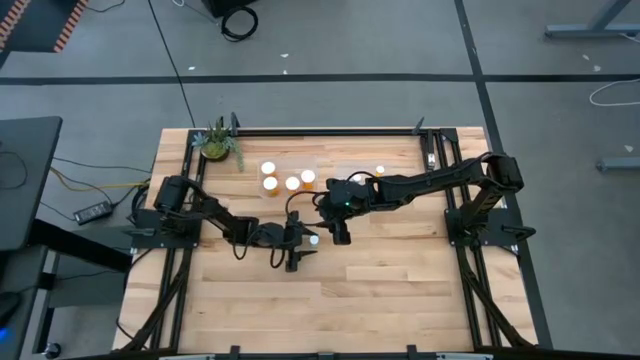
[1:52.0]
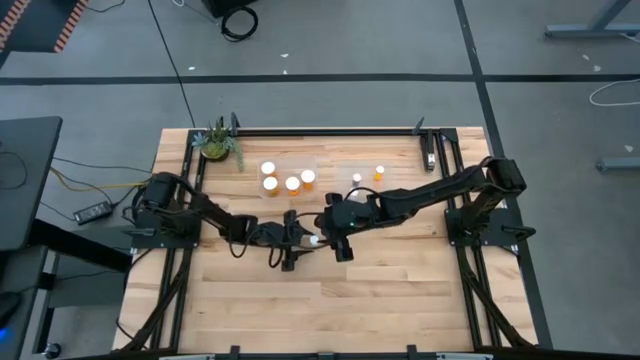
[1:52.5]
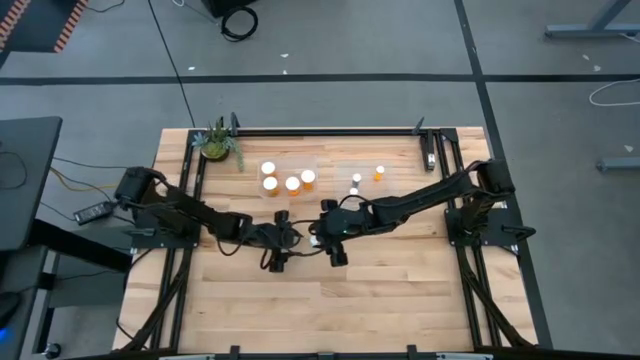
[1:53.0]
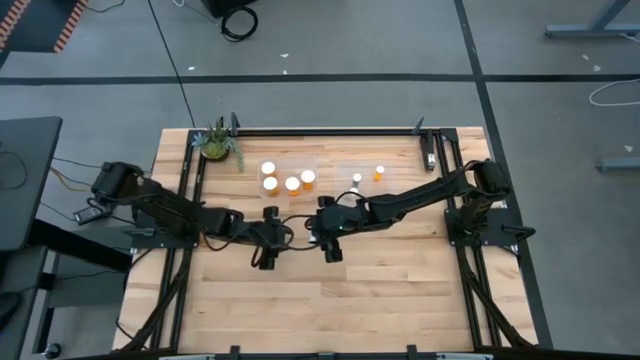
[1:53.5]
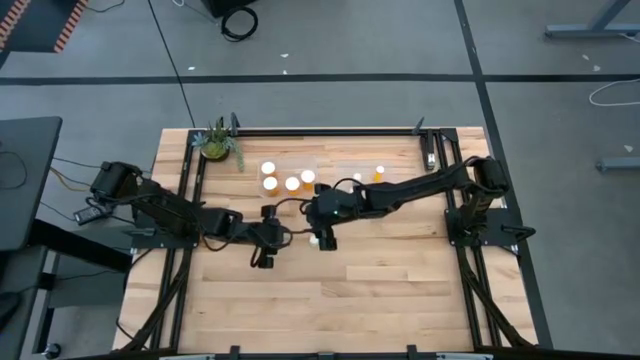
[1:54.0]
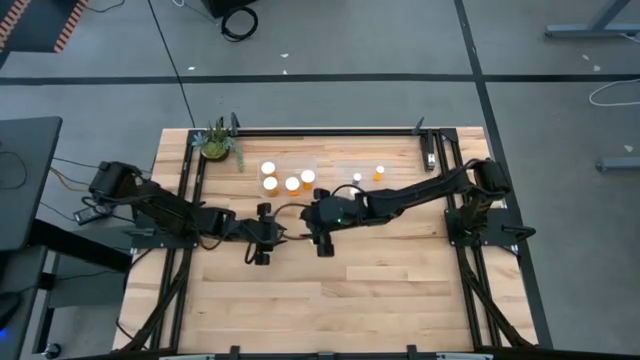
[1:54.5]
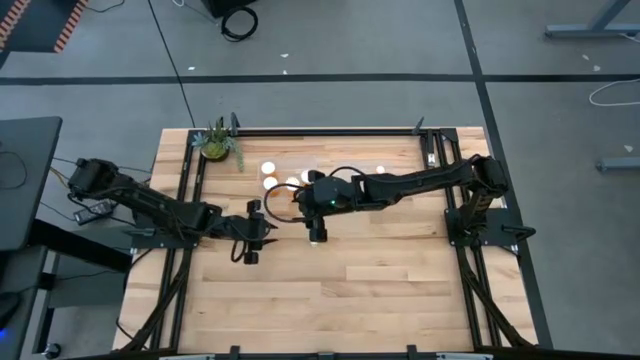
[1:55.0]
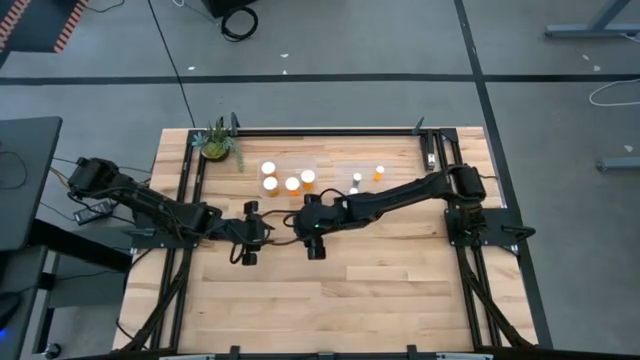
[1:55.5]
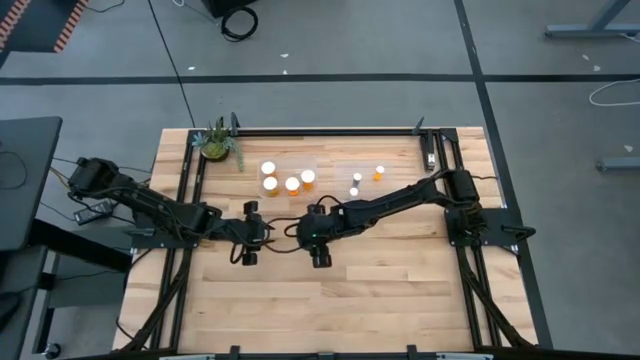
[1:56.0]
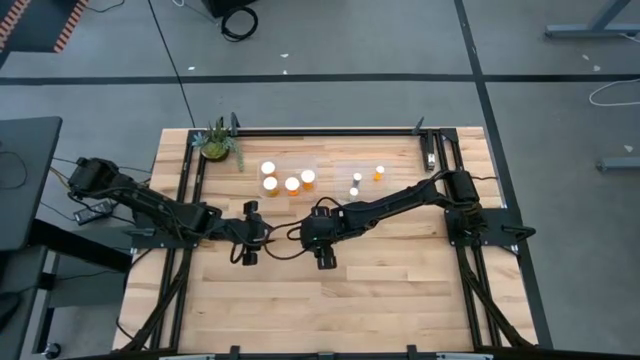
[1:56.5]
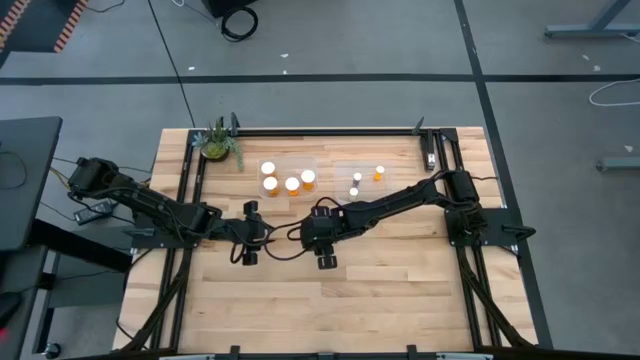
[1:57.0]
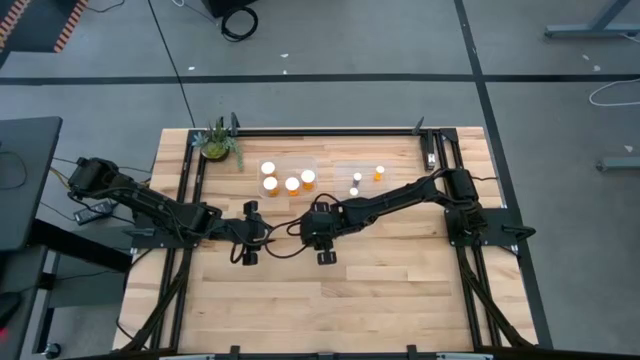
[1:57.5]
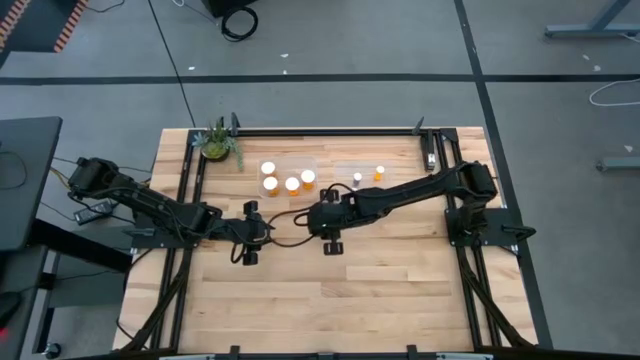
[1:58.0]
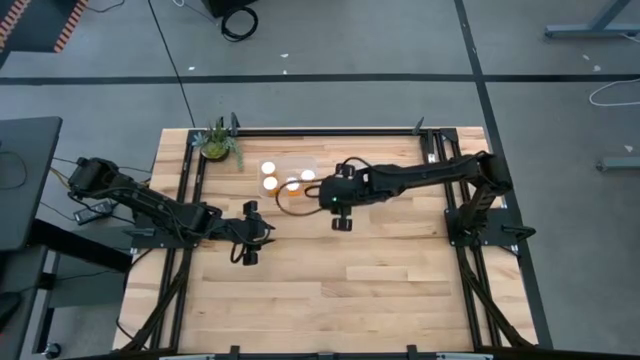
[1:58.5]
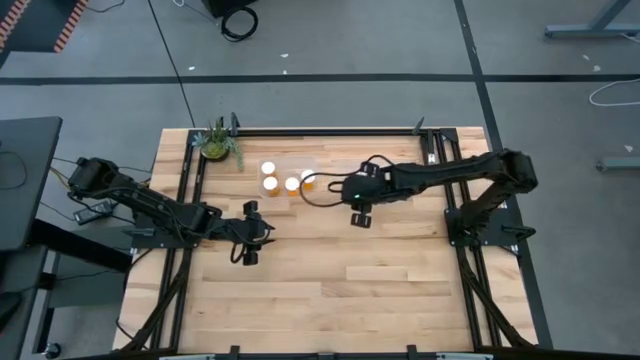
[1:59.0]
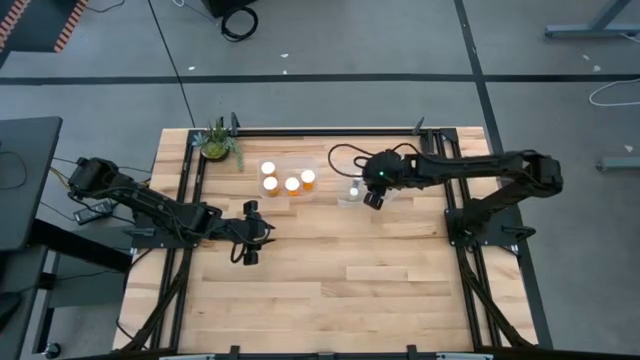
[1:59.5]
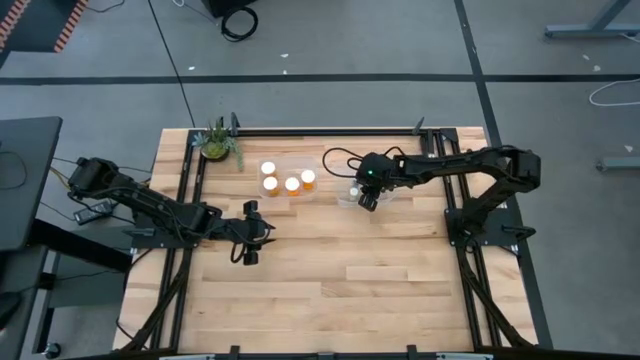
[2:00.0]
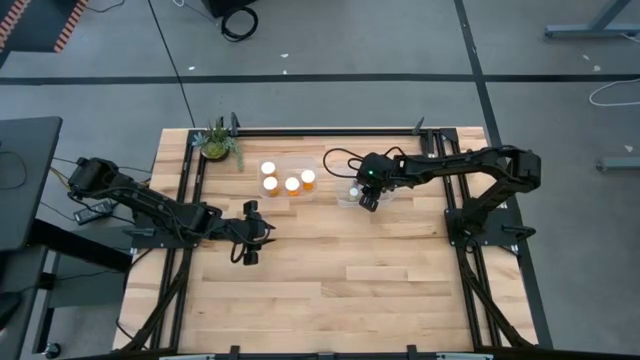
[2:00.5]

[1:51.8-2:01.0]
Task: Pick and place medicine bottles into bin by pill shape (circle, oval)
Put the small yellow pill bottle into the right transparent bin

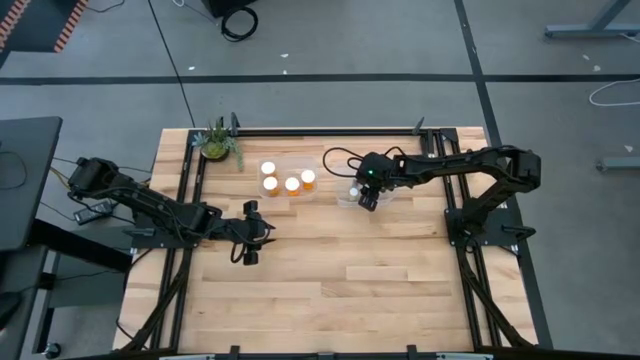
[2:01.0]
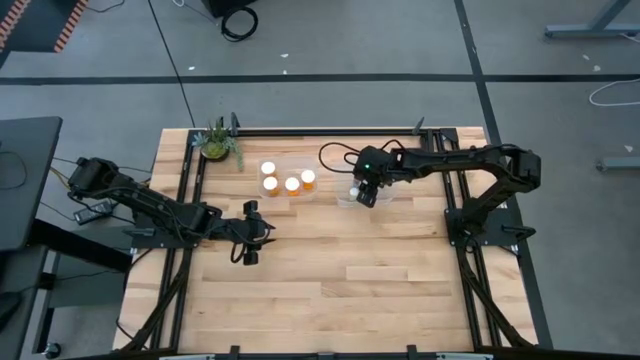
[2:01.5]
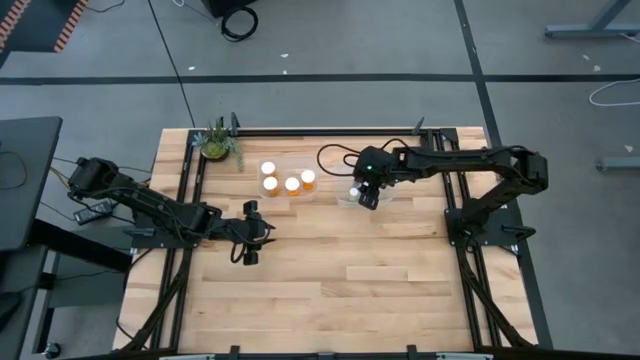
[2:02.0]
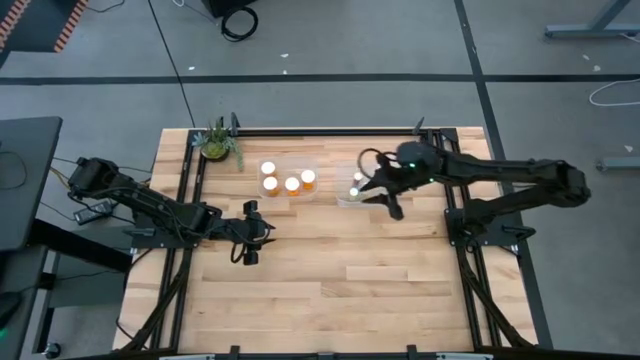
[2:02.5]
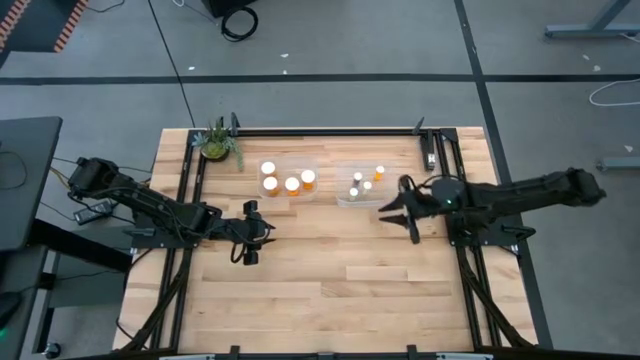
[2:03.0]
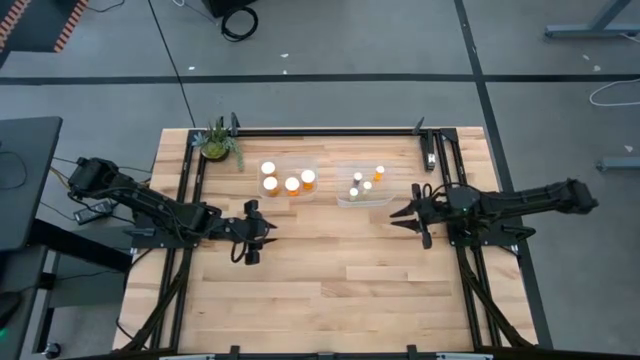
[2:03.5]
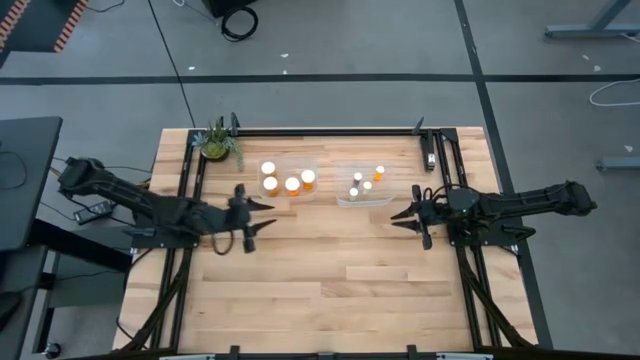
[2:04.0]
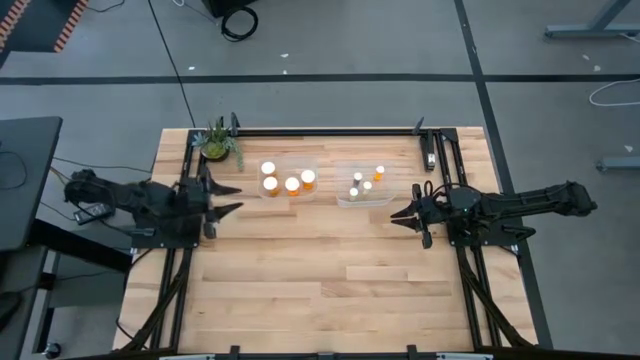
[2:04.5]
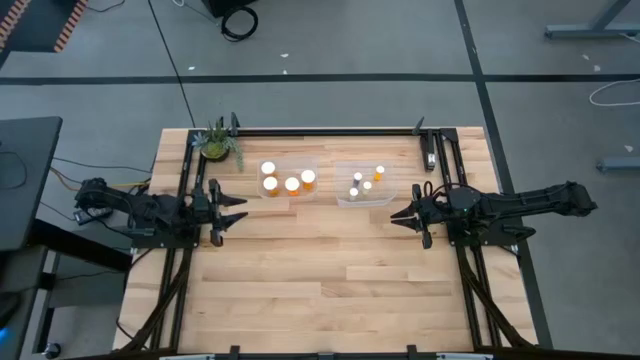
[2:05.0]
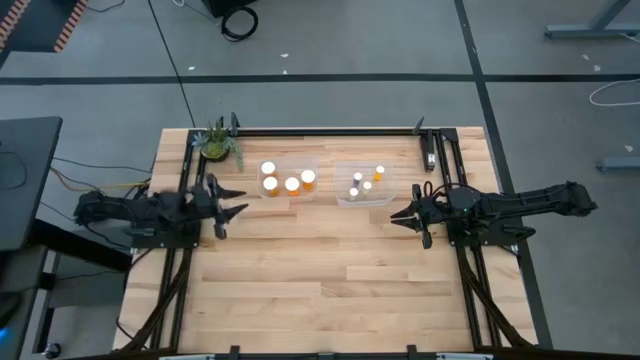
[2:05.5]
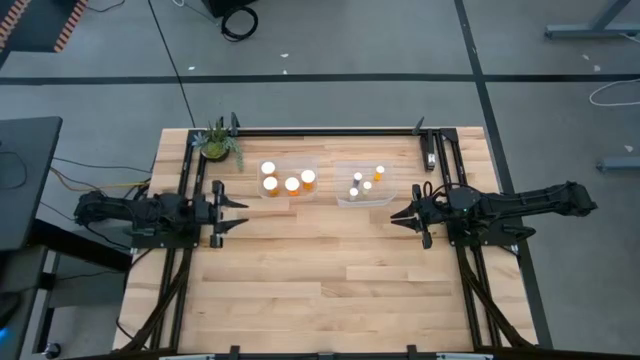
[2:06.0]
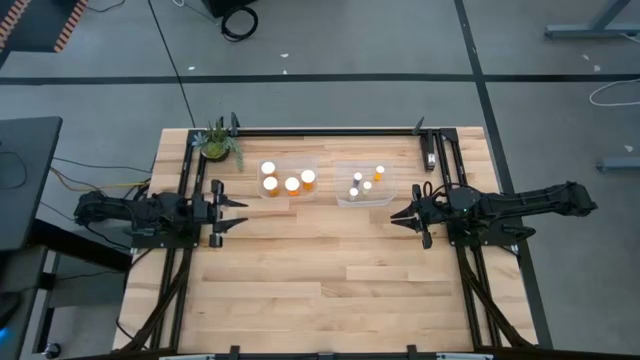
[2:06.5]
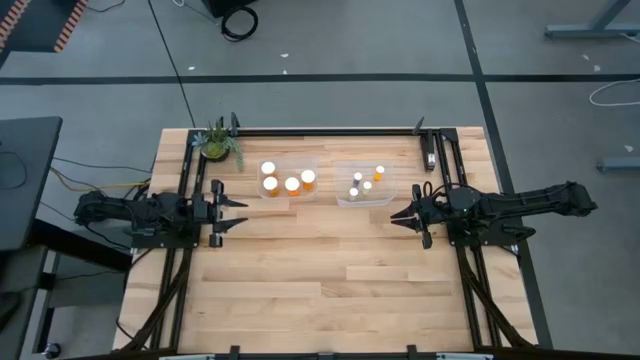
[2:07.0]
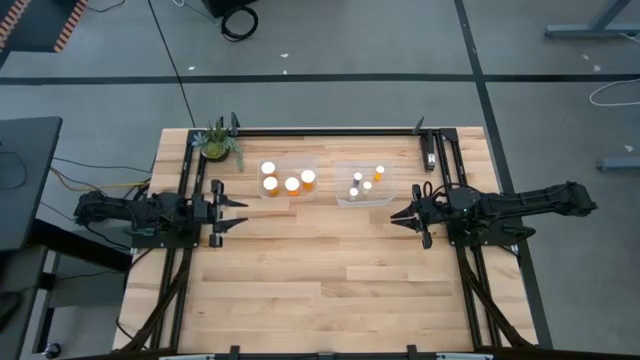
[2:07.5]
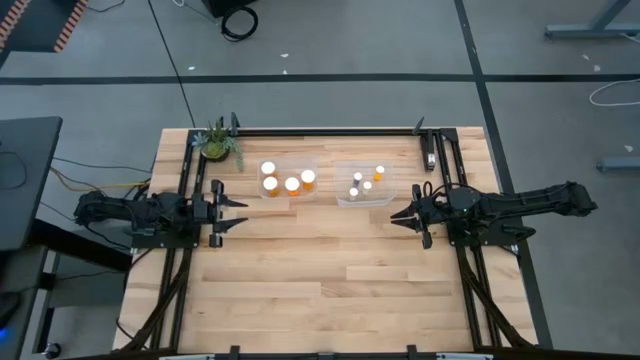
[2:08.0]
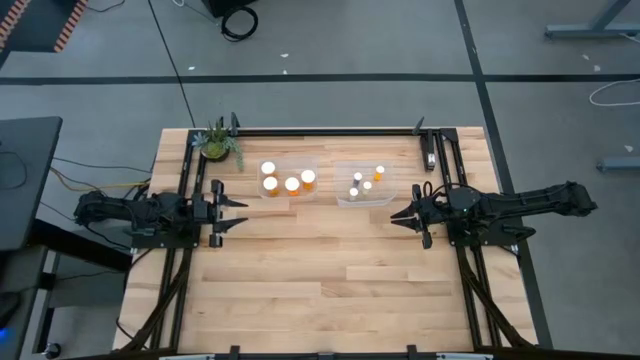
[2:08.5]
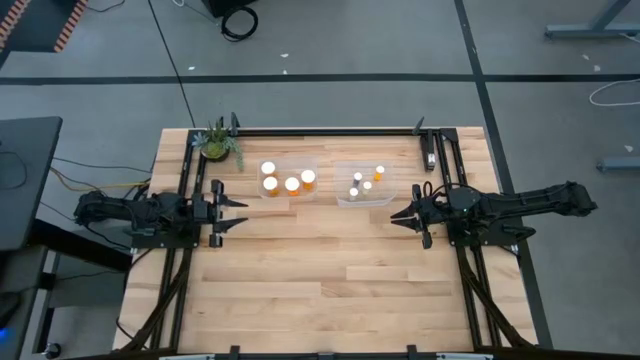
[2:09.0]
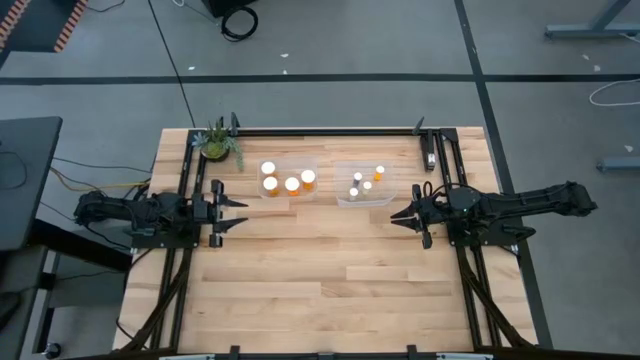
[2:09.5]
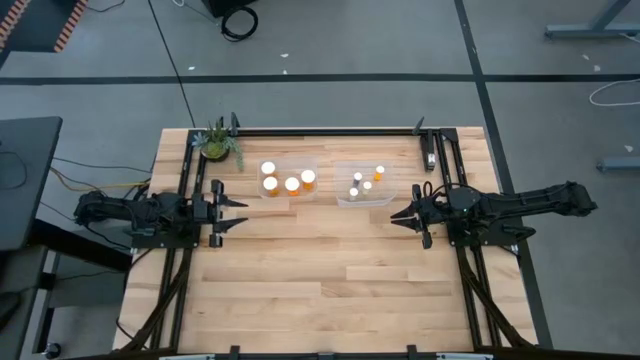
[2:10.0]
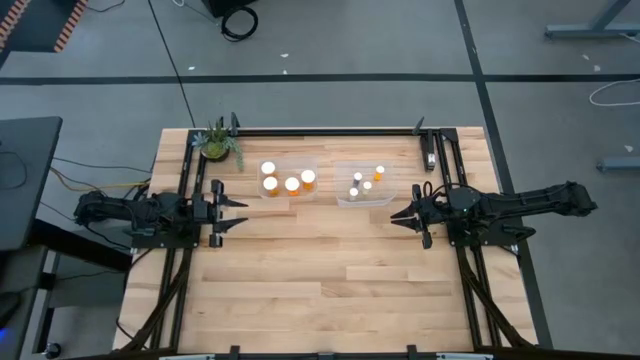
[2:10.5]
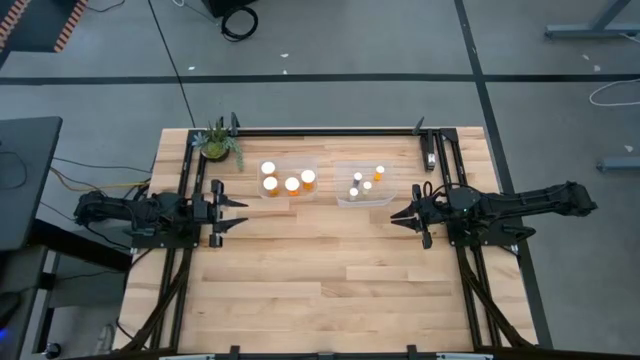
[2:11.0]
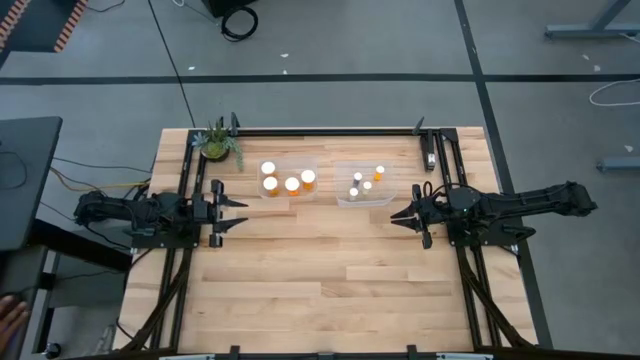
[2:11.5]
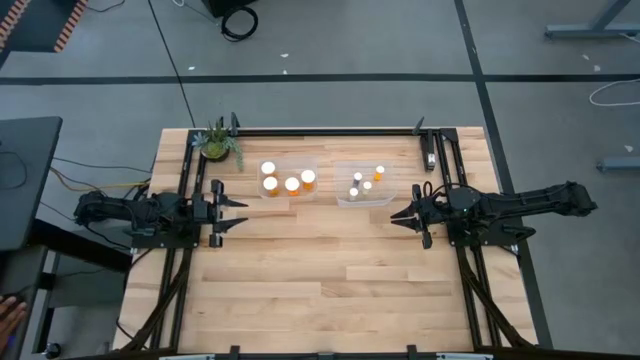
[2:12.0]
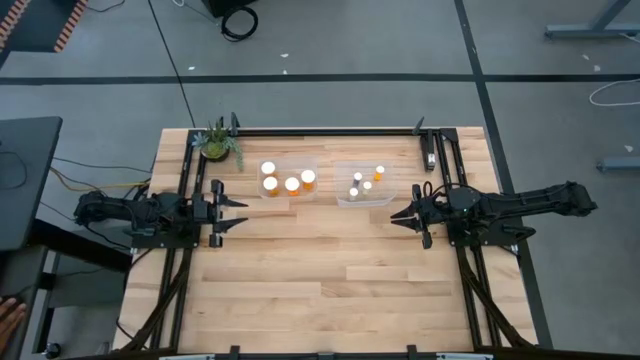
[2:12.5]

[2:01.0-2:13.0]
Return to Home Position

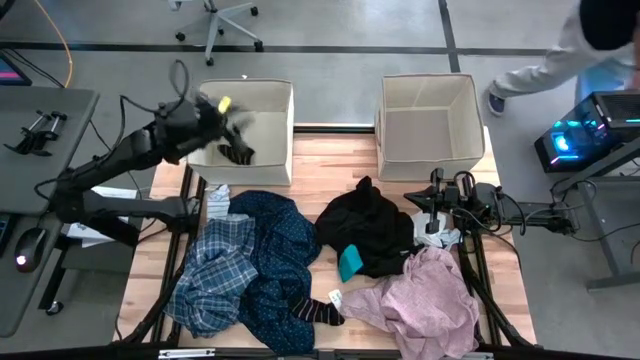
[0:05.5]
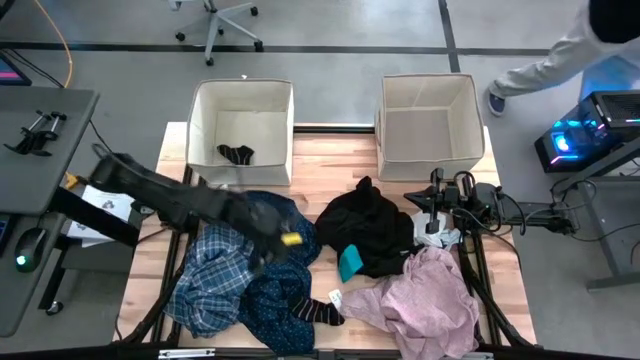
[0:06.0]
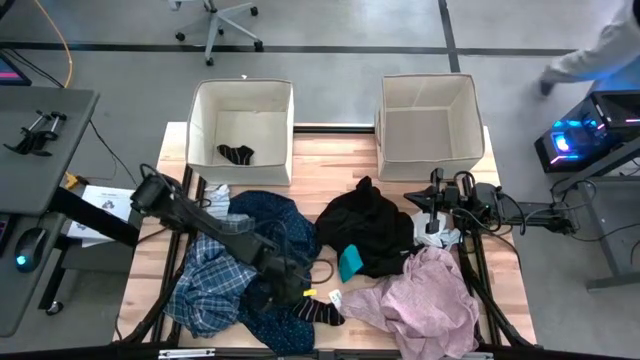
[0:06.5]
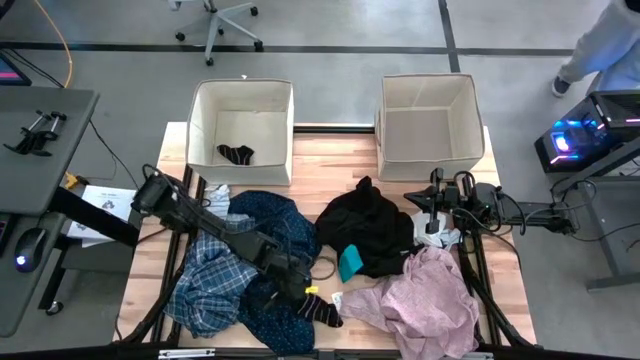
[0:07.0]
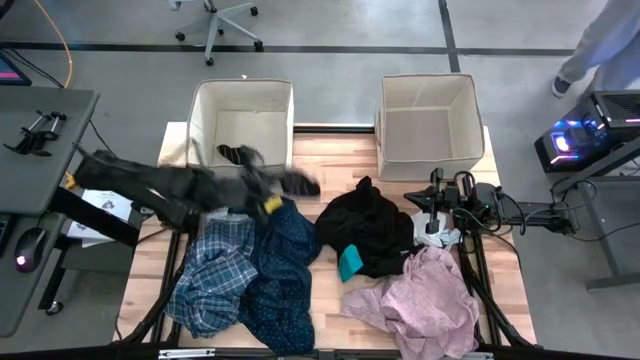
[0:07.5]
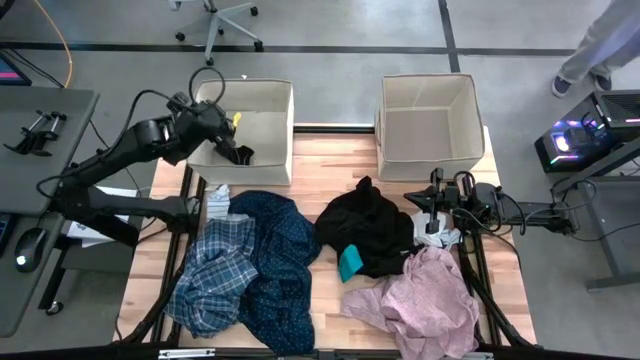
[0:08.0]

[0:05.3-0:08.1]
Task: Sort clothes
Put the black sock into the left laundry bin
